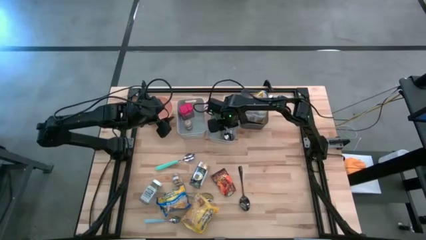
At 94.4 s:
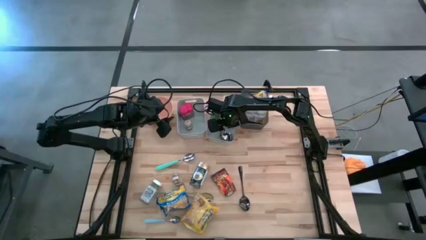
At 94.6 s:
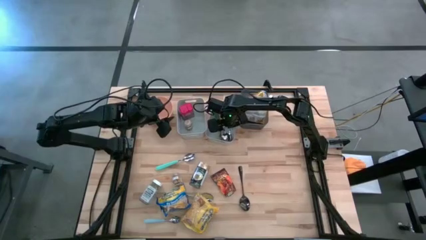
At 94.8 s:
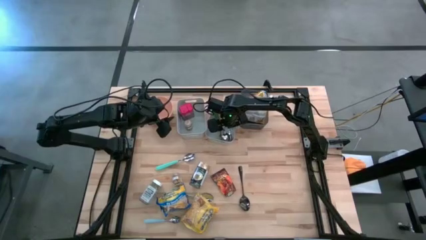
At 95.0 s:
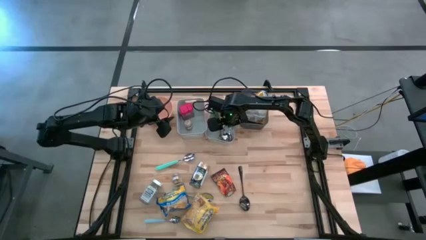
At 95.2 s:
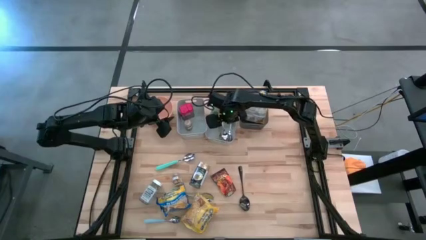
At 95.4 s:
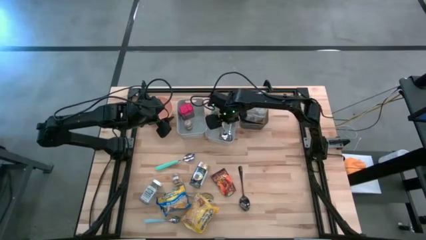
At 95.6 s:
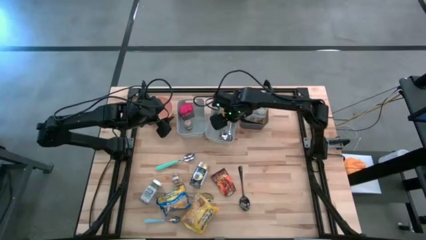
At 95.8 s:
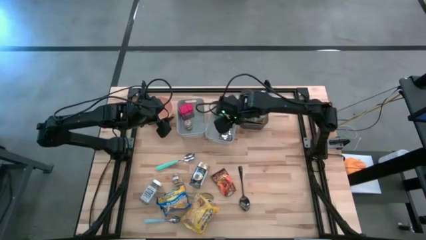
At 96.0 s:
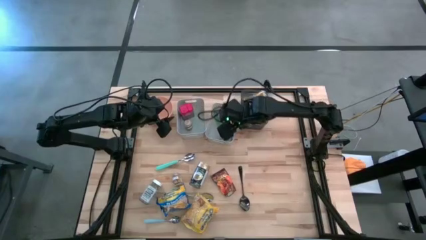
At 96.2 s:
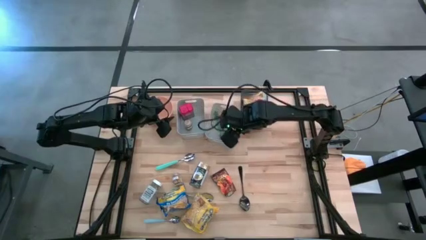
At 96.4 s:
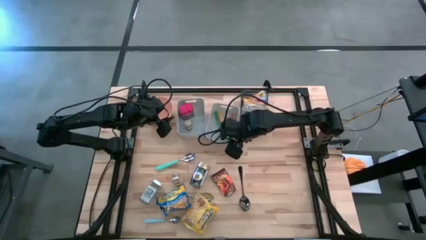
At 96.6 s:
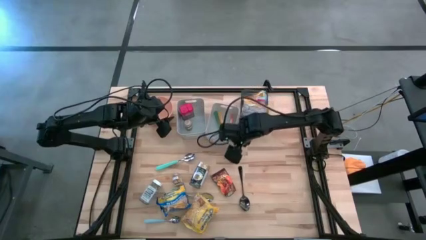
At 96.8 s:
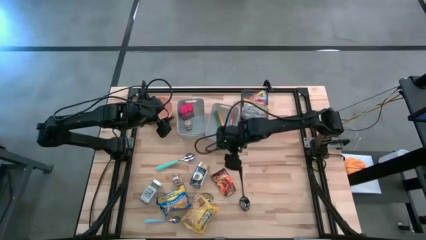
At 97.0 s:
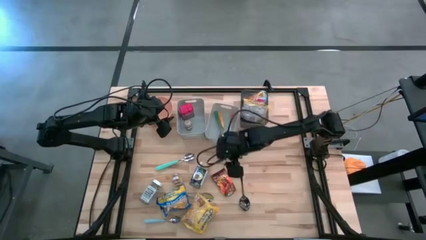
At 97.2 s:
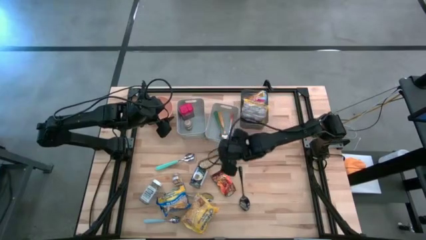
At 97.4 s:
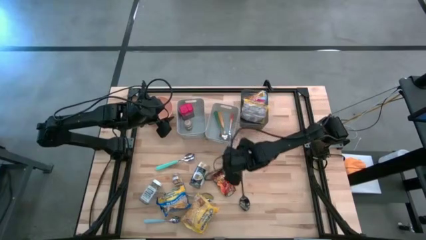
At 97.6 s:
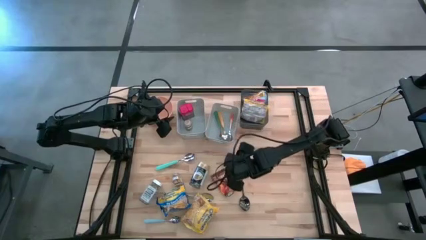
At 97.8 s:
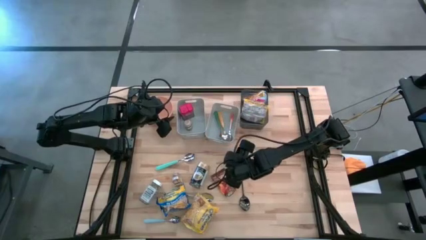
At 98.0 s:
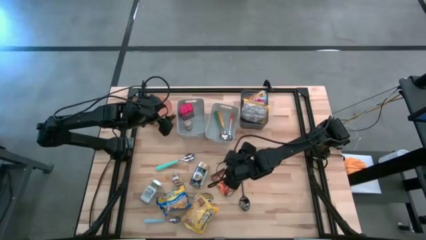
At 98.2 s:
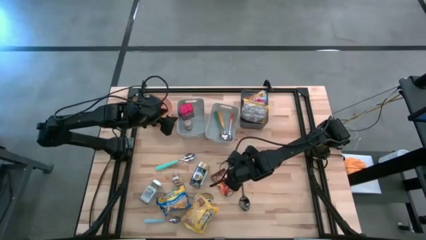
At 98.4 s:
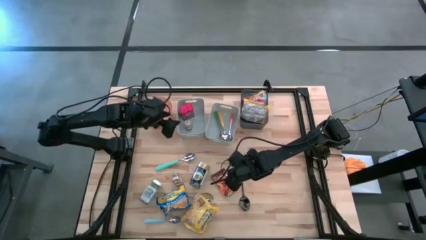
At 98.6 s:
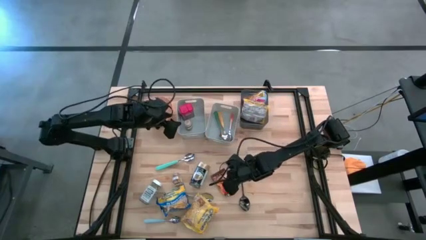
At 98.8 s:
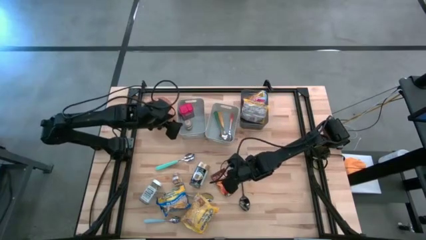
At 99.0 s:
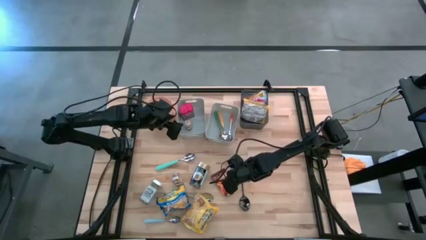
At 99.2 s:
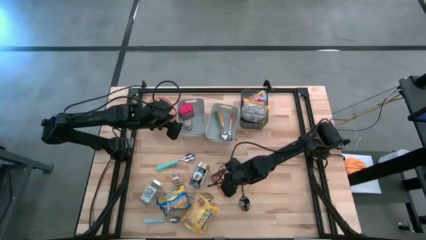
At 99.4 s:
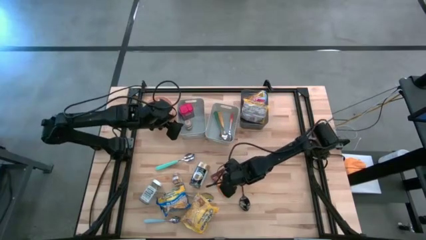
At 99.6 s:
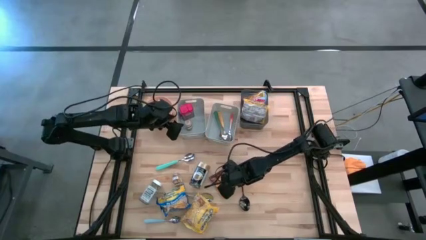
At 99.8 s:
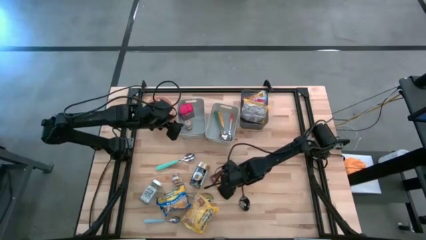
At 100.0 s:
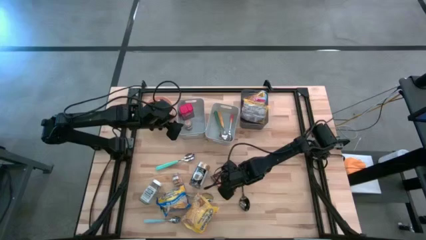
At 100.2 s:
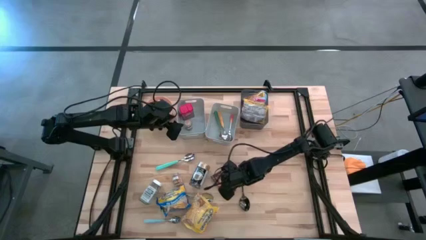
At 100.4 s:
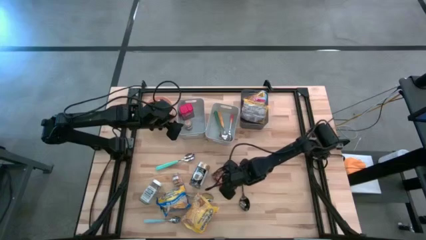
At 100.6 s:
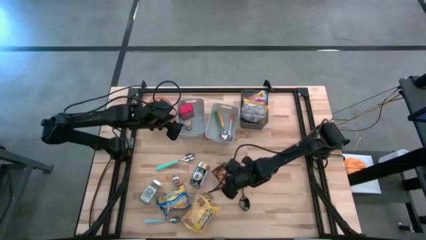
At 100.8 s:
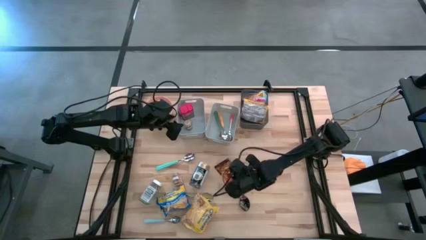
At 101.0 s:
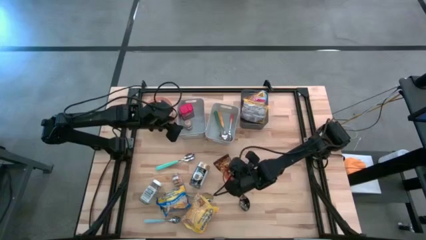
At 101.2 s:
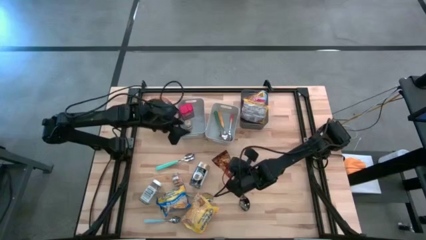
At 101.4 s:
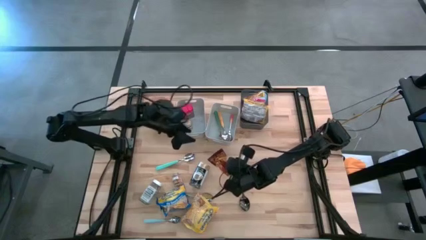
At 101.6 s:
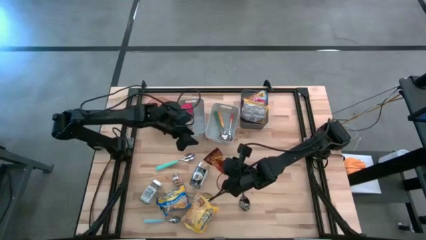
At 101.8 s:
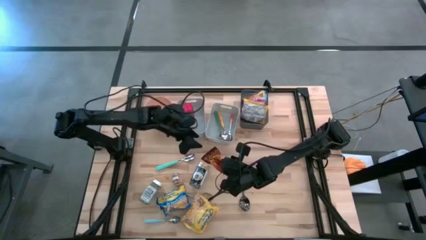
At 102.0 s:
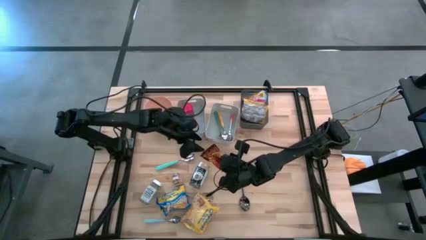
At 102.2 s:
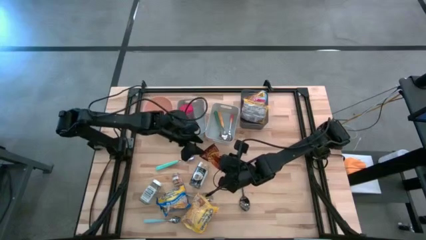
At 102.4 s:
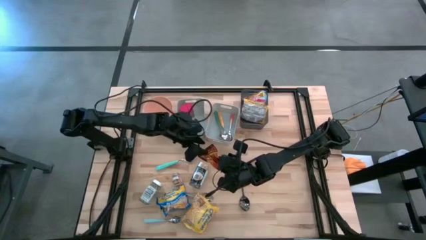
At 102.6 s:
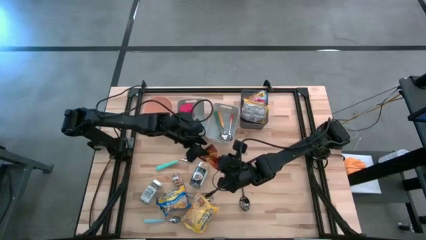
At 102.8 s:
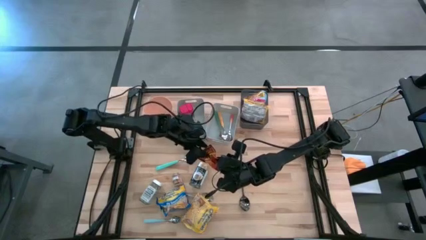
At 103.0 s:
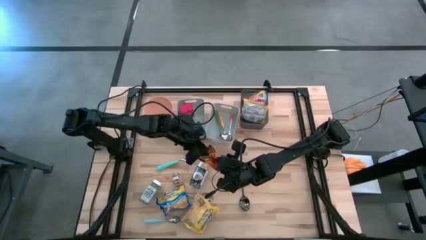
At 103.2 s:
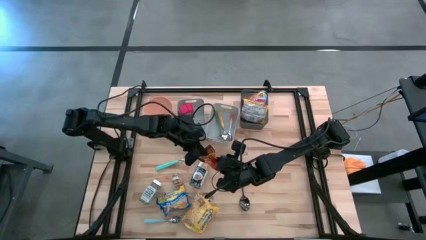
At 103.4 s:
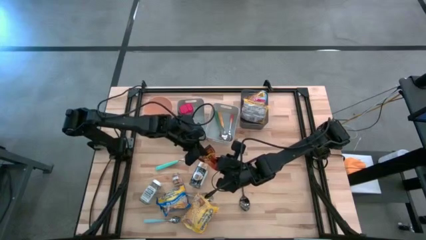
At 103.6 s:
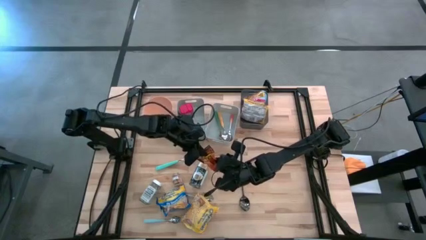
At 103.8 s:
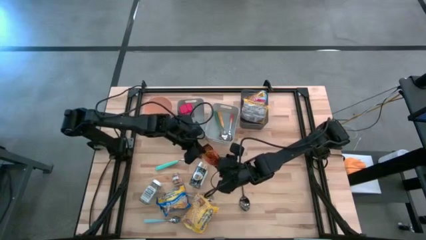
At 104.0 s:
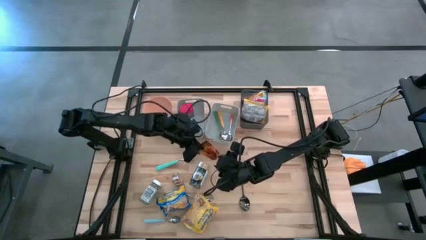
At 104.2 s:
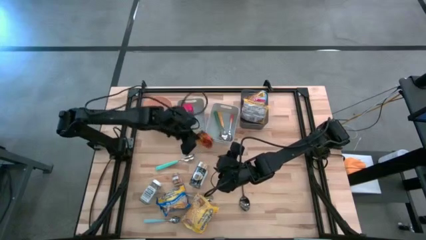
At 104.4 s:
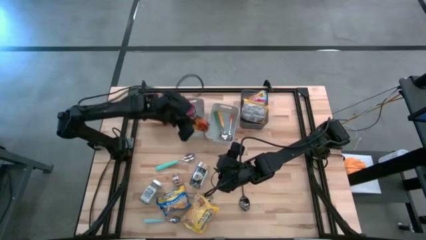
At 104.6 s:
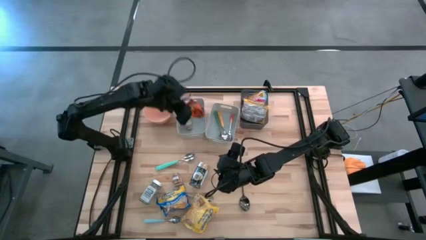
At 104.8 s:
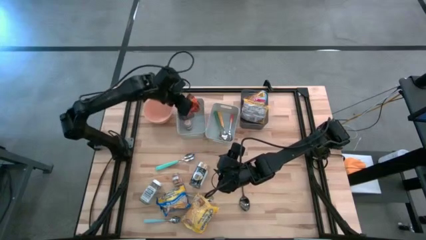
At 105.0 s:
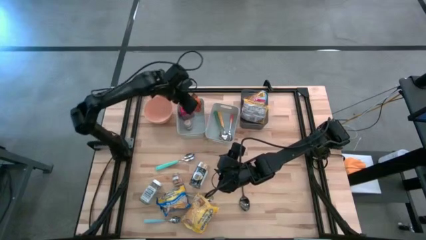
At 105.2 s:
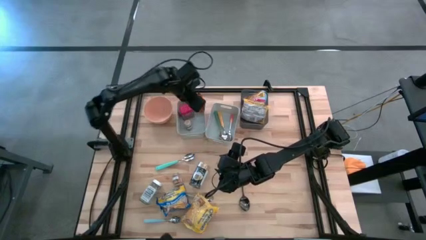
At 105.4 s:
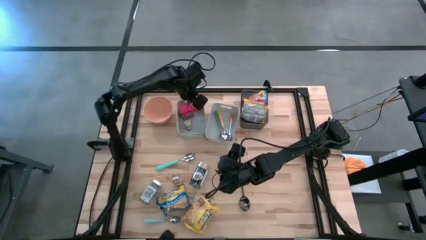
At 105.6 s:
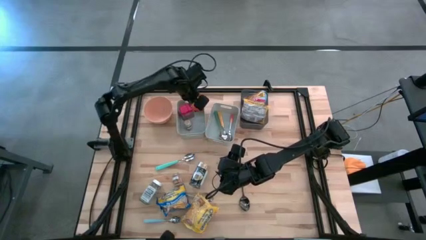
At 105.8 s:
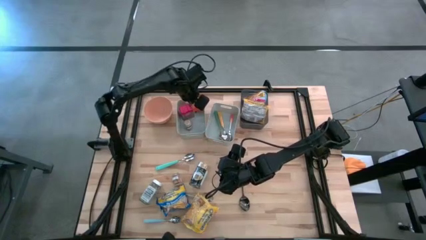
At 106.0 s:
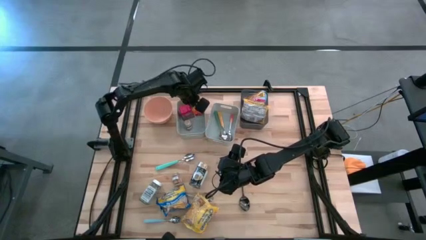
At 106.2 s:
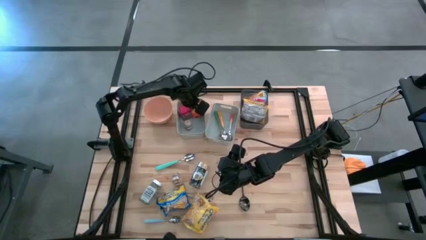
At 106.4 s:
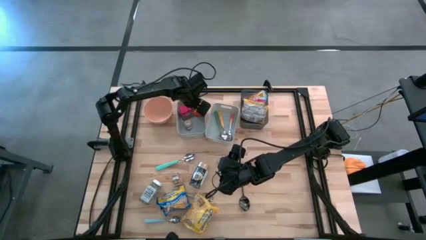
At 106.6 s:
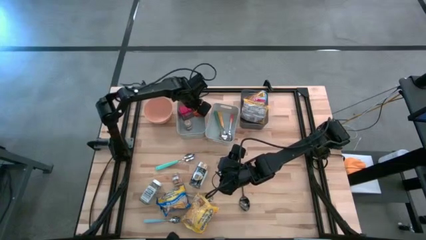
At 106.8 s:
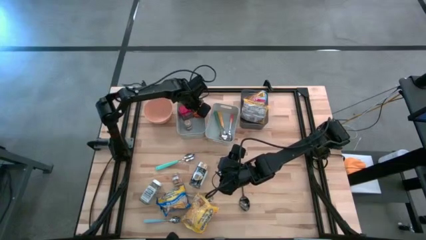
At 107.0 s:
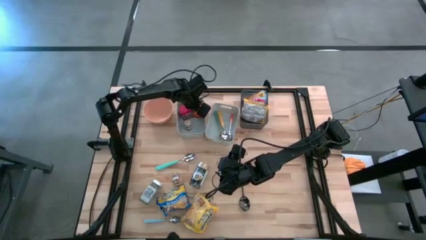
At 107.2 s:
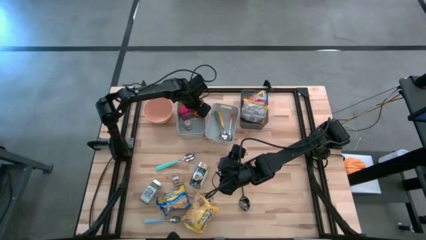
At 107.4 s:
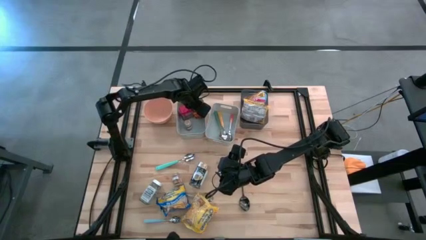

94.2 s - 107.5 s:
Put the orange seasoning pack into the left gray bin
